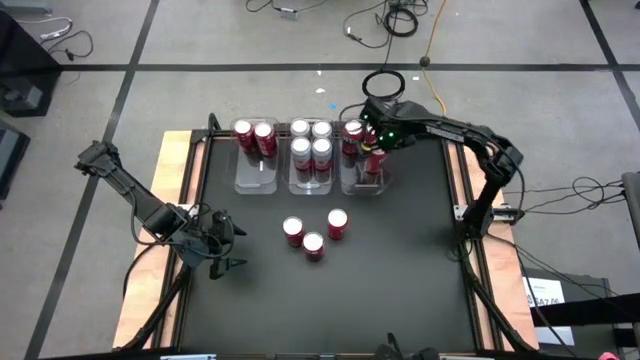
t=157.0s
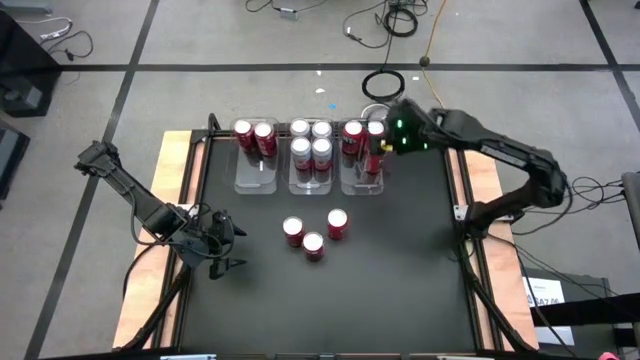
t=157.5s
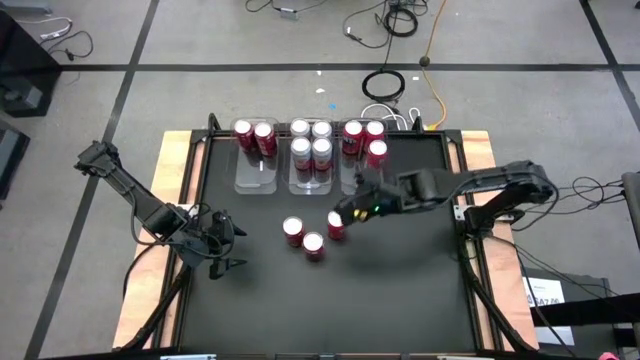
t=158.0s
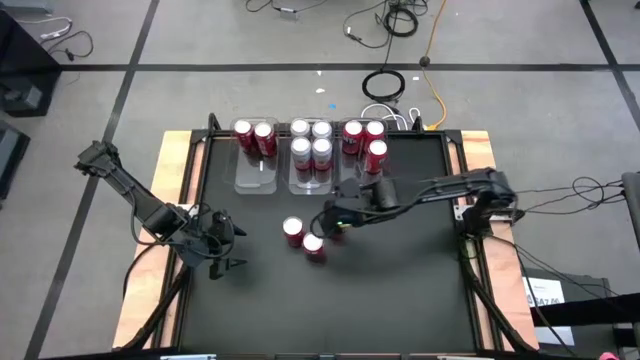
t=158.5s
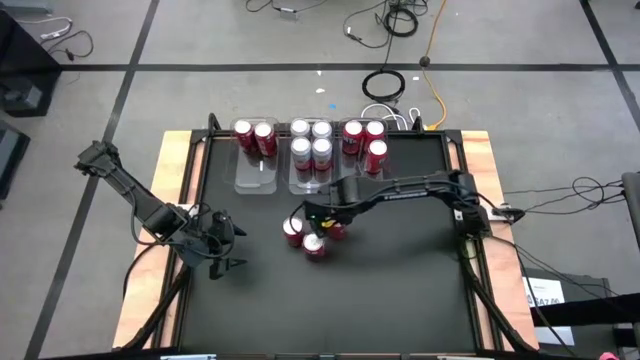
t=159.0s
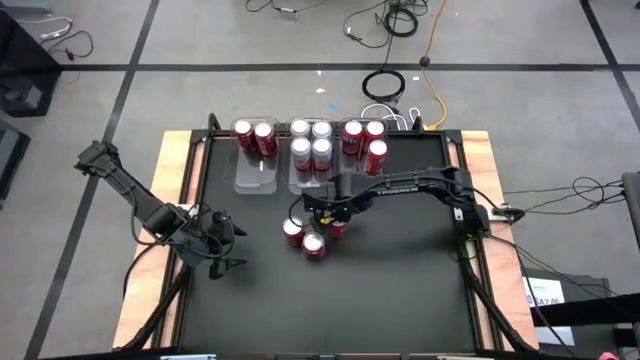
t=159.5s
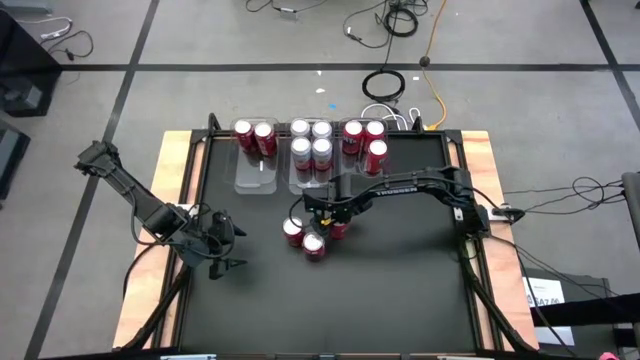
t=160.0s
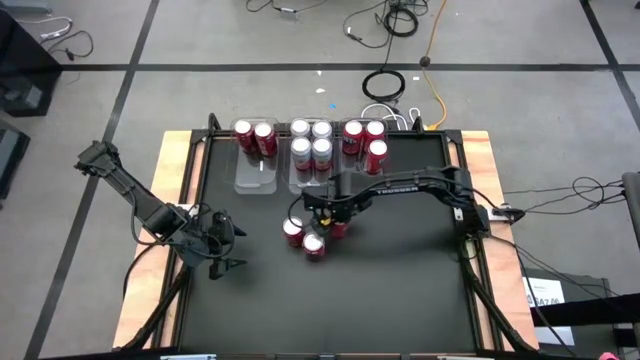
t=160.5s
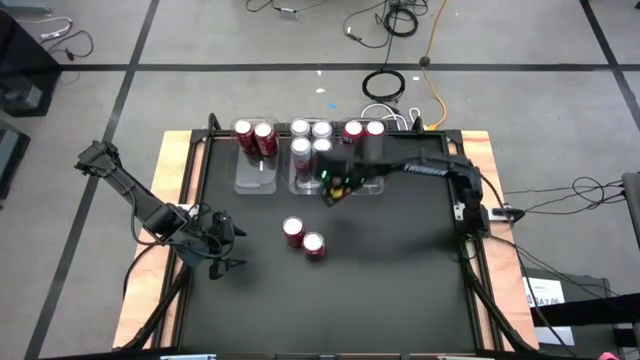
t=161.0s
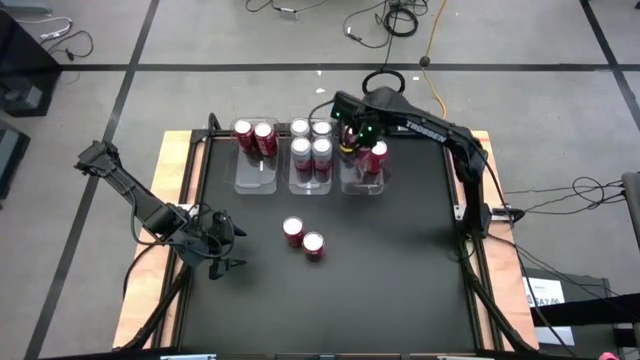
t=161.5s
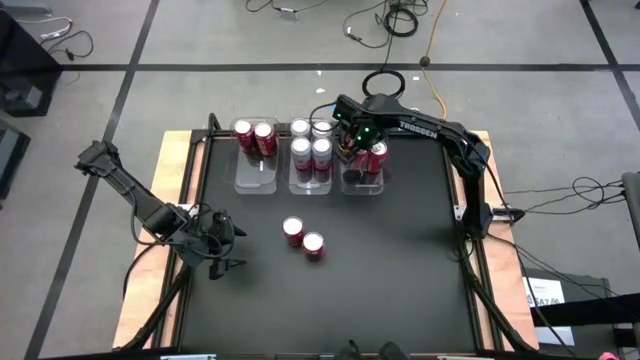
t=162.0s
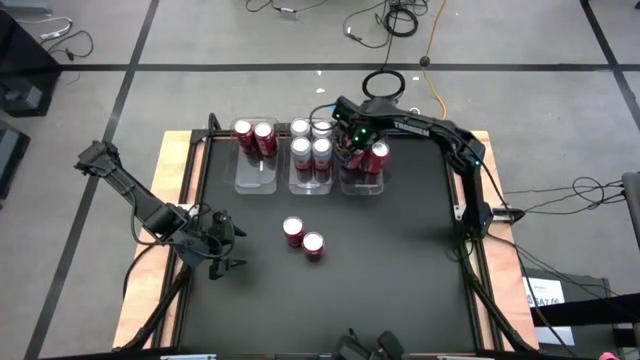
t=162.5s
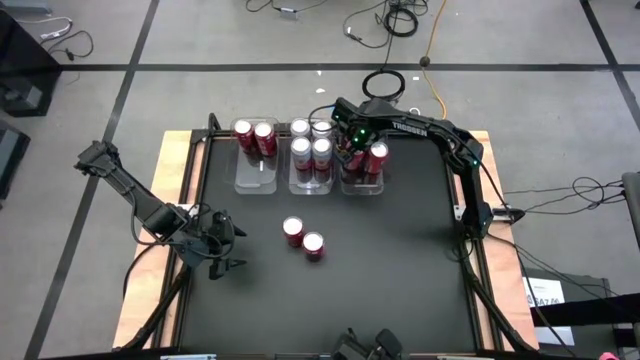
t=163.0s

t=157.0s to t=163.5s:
Task: Sort soda cans
Put the orange soda can into the right transparent bin

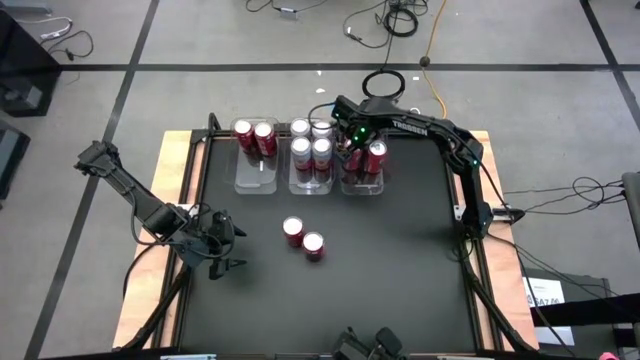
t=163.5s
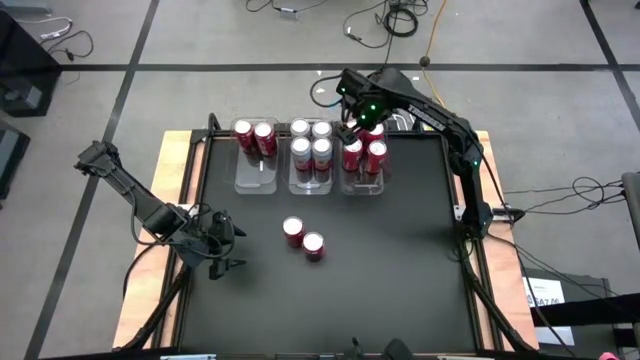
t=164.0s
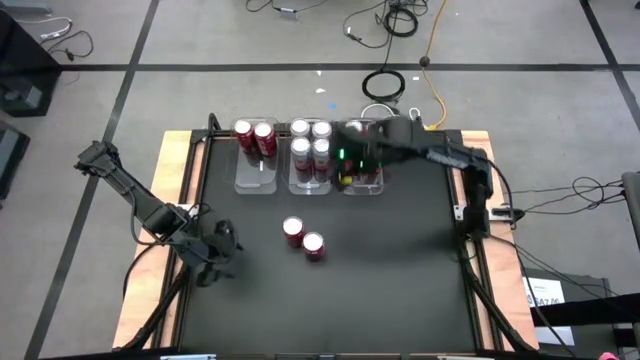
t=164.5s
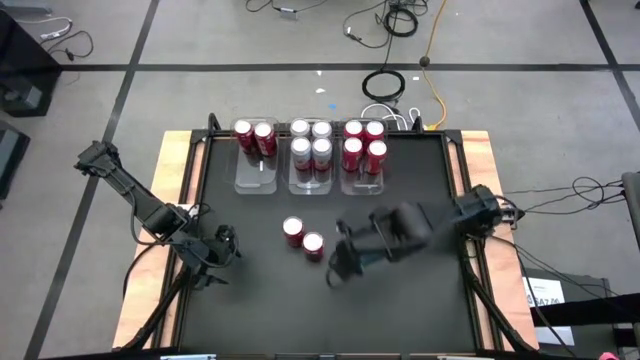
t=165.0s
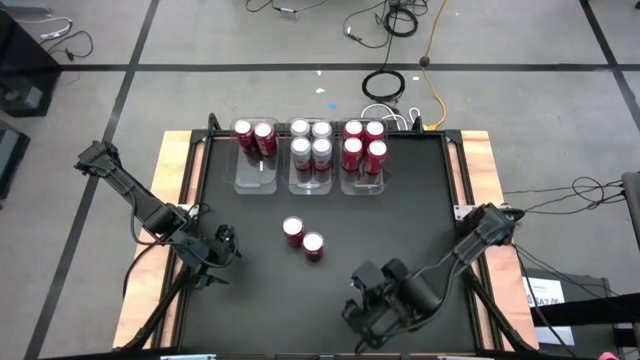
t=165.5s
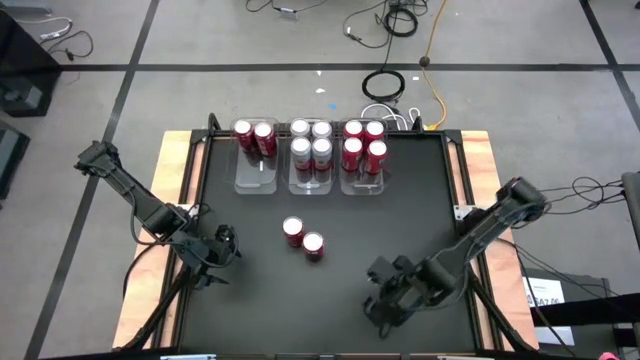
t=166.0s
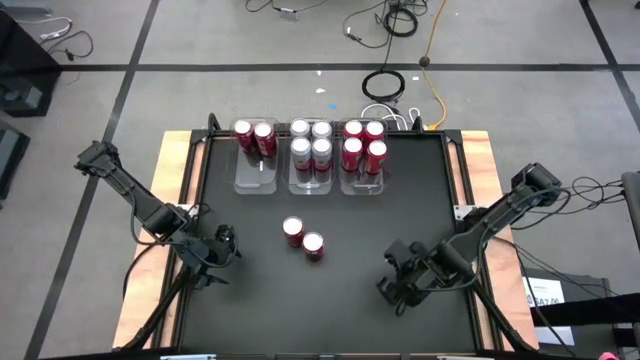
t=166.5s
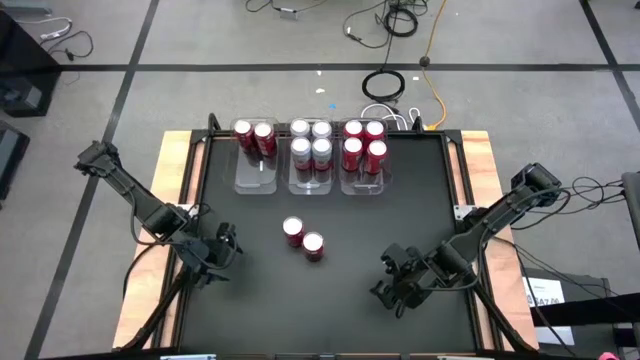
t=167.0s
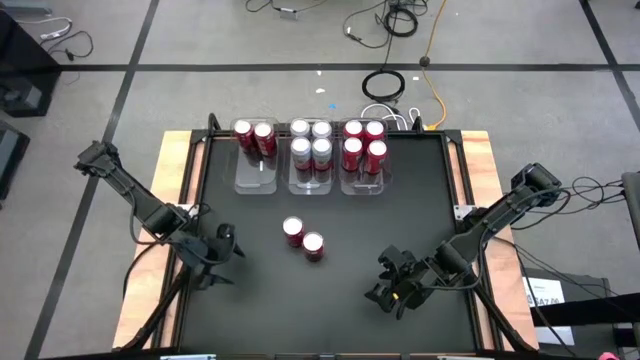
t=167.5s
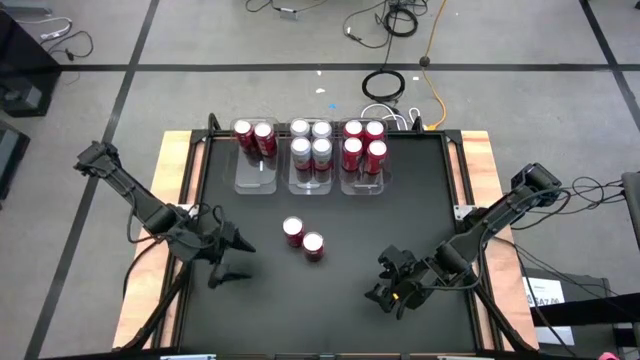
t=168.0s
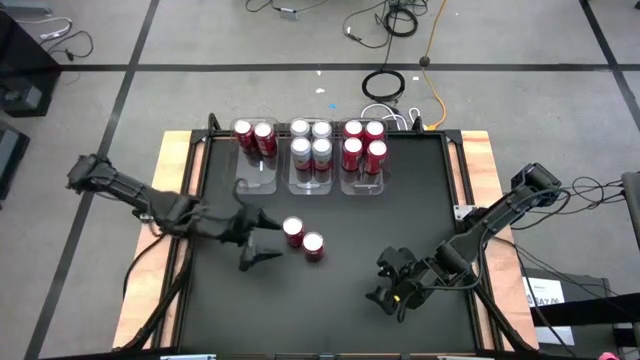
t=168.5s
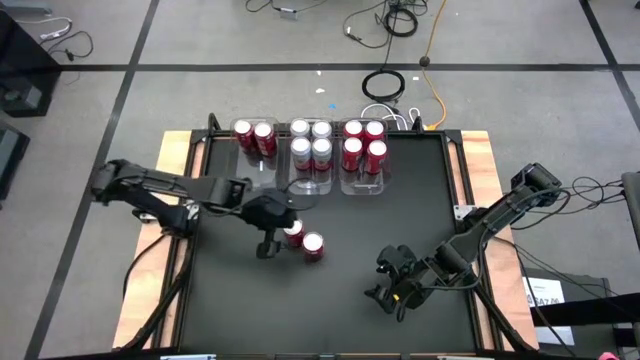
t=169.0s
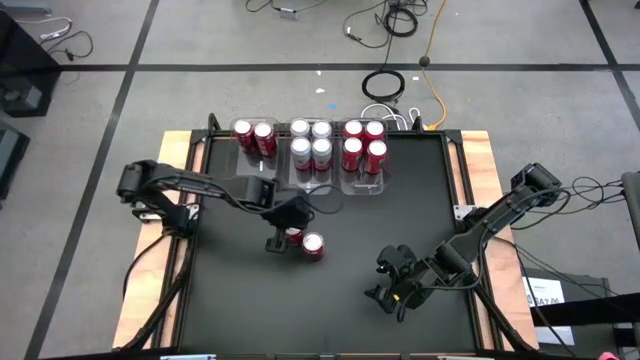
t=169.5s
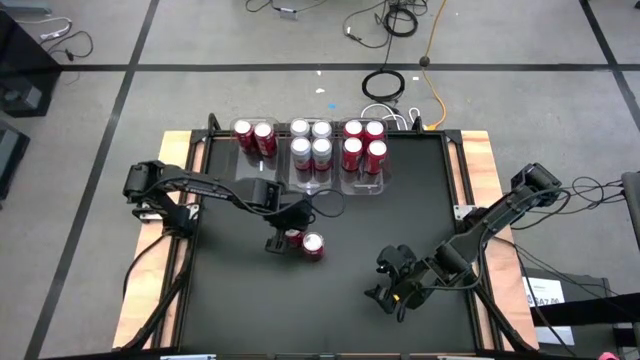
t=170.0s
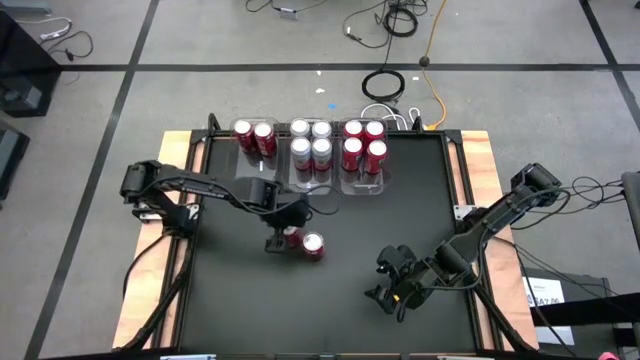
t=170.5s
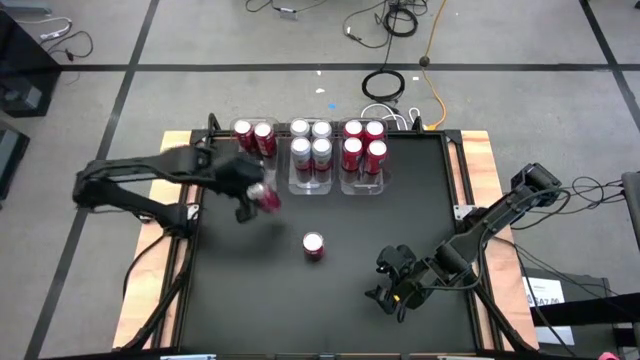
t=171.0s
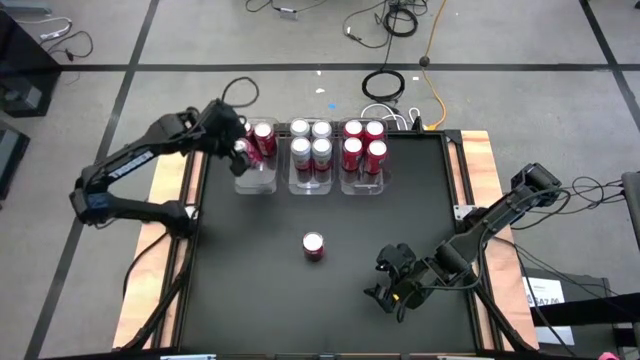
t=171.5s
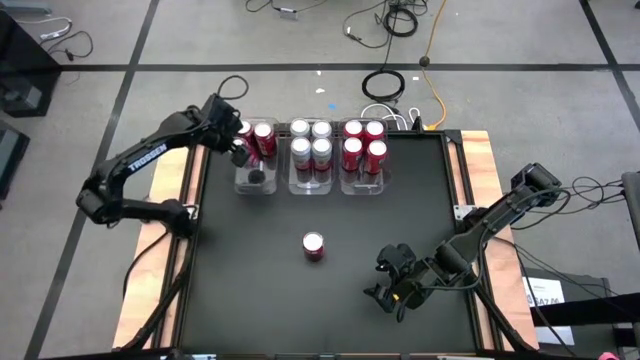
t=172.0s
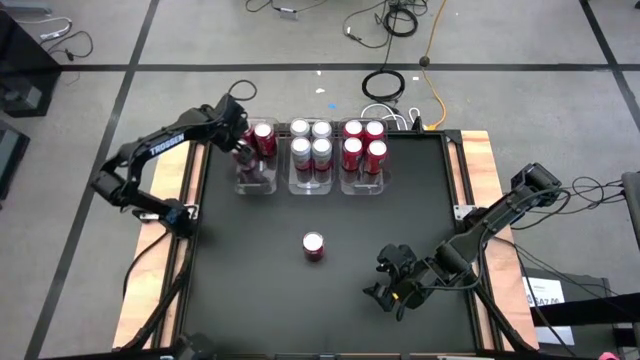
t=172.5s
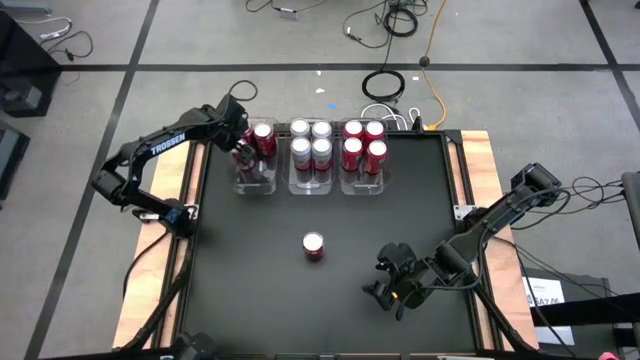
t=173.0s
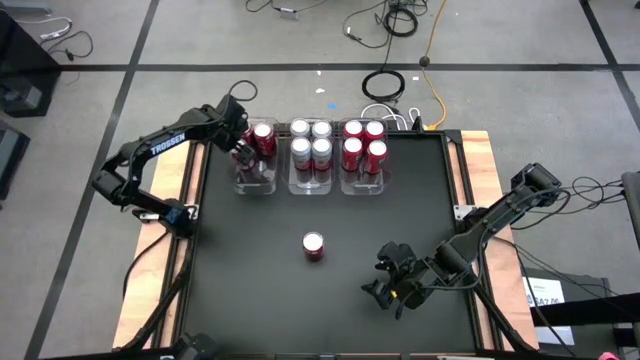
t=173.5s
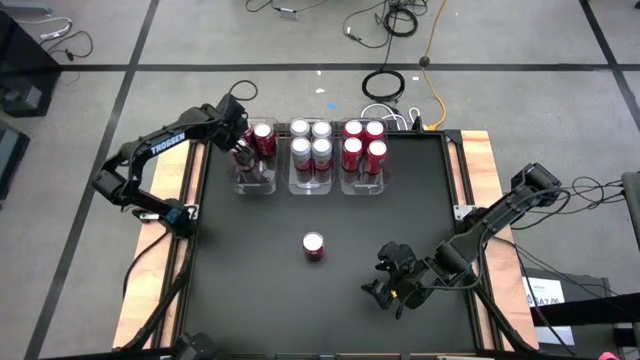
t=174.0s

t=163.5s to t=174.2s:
Put the top red soda can into the left transparent bin

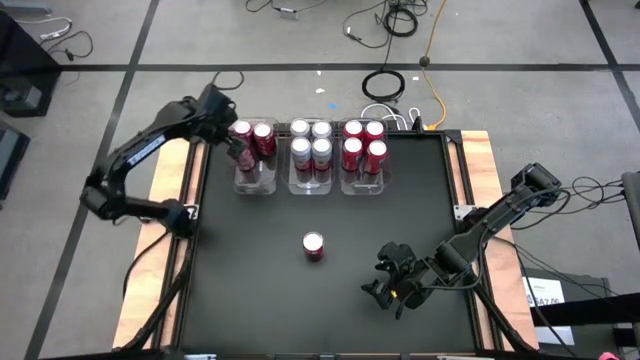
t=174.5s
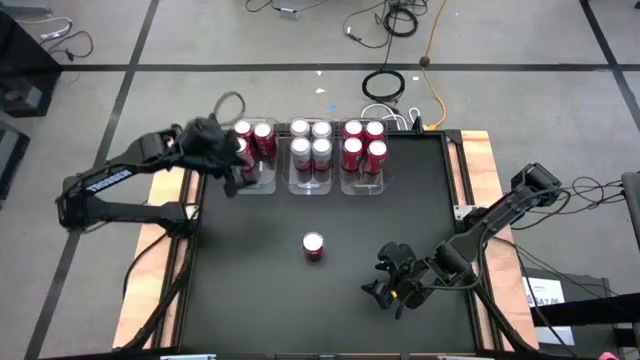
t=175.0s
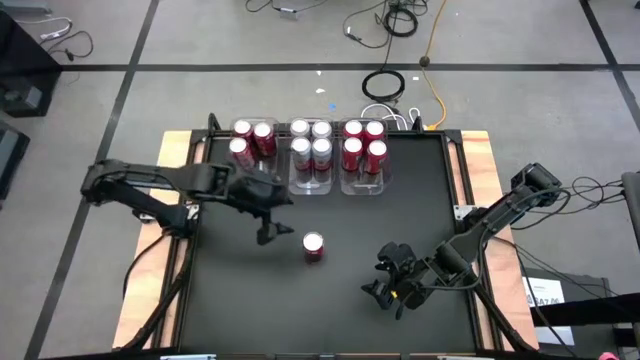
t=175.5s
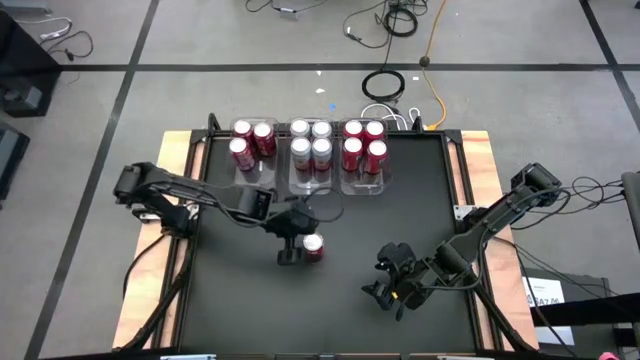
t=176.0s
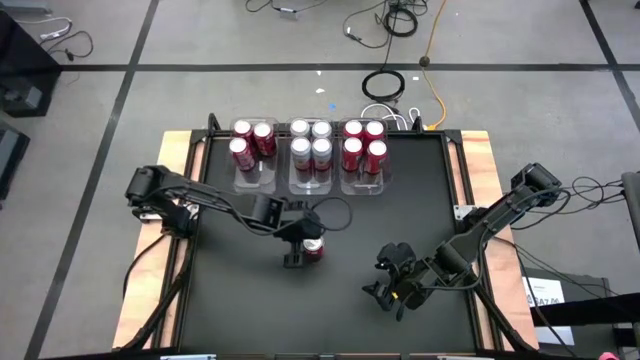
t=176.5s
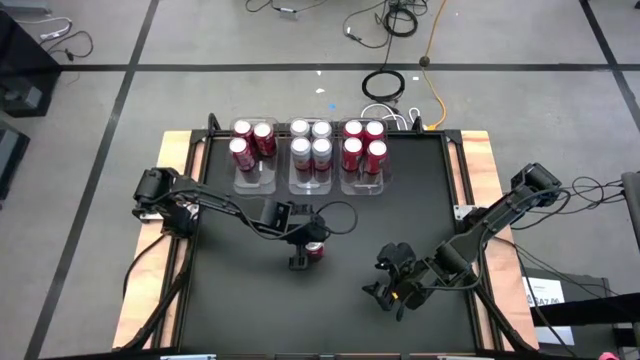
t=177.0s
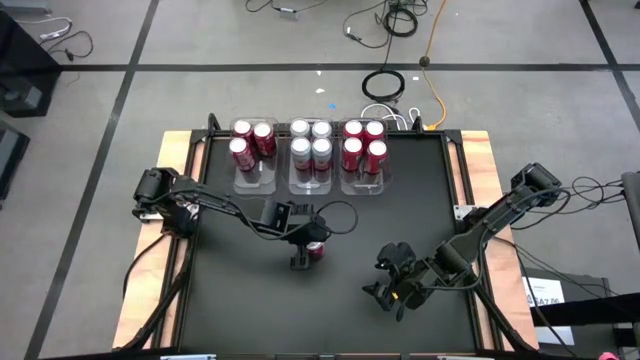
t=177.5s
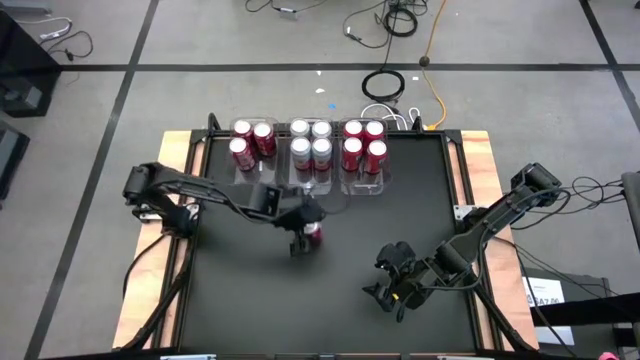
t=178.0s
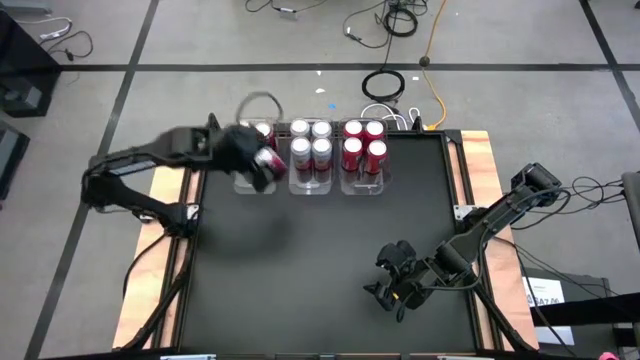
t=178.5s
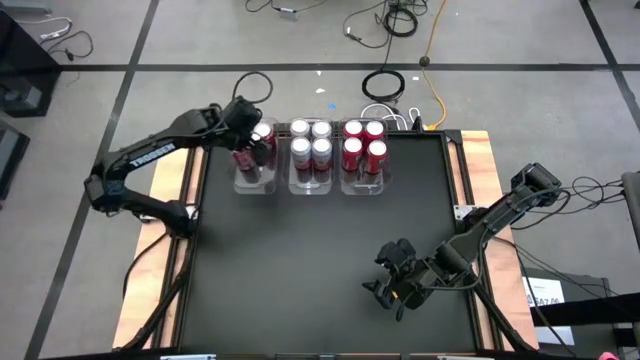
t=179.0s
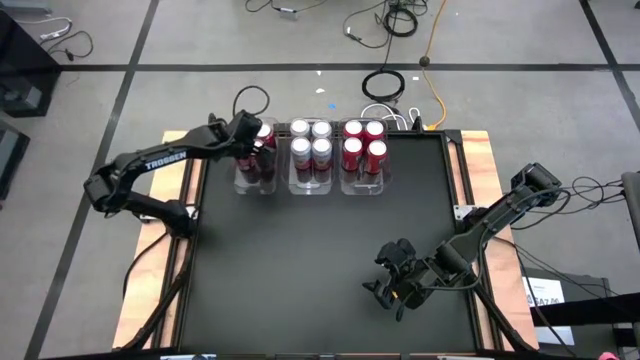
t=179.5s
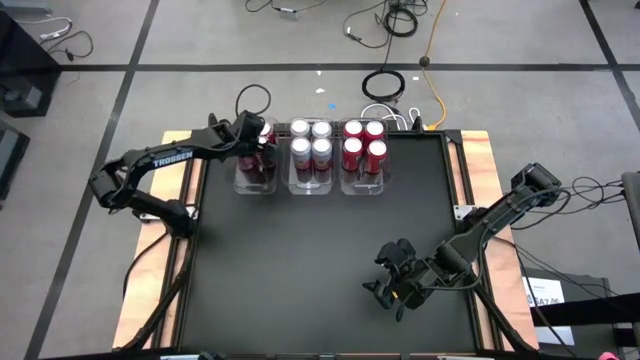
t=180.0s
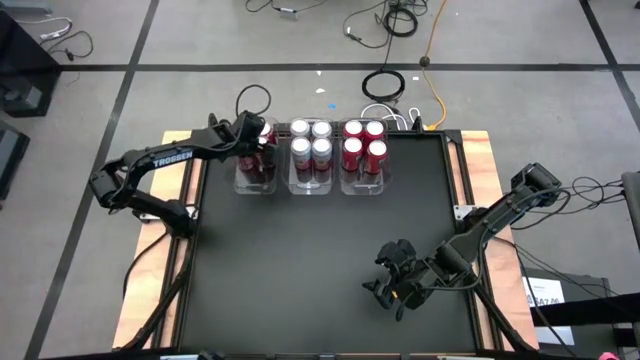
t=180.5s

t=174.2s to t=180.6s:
Put the red soda can into the left transparent bin
